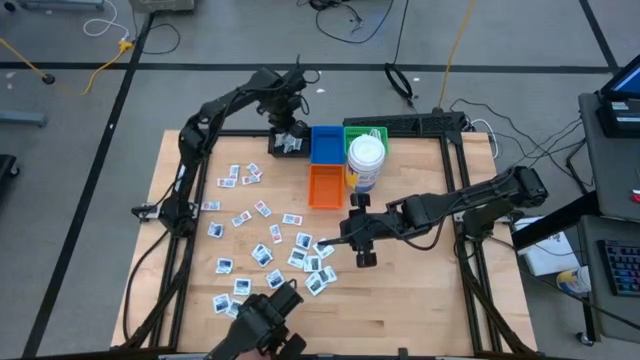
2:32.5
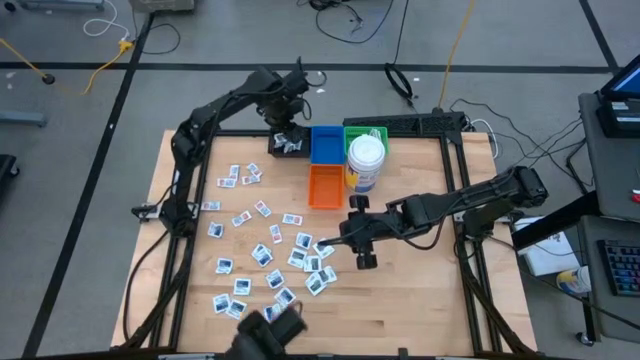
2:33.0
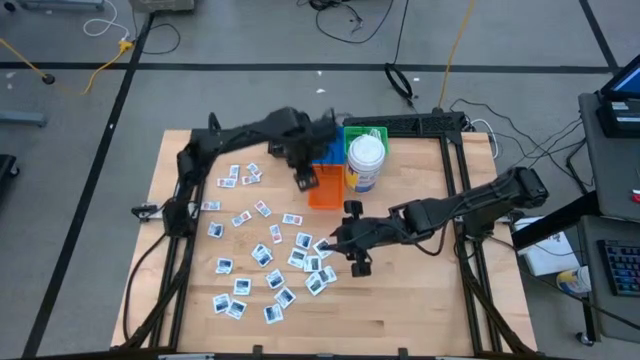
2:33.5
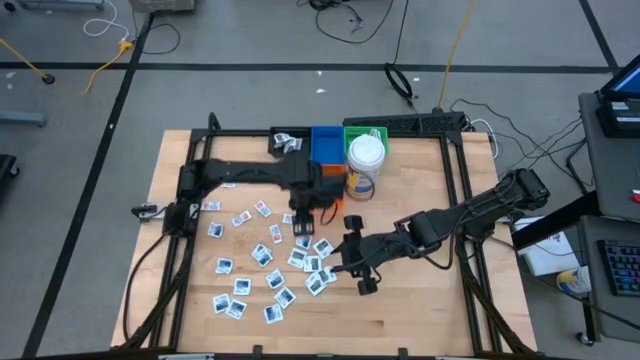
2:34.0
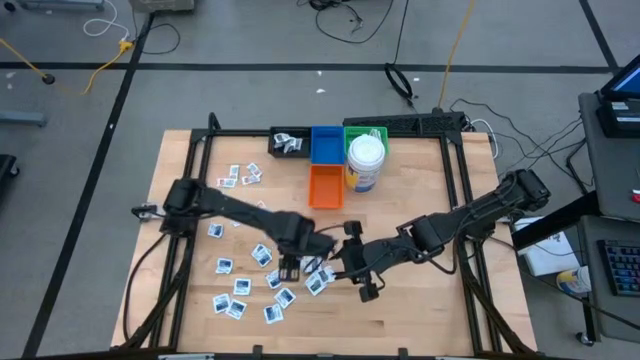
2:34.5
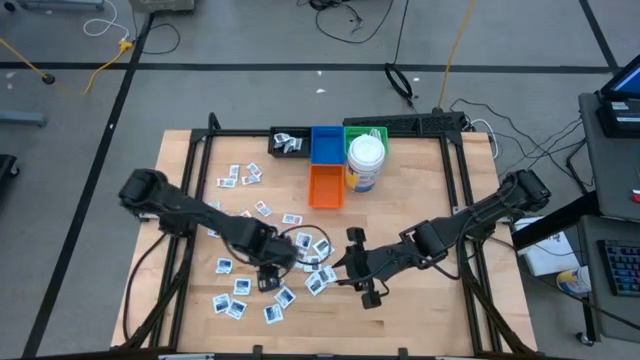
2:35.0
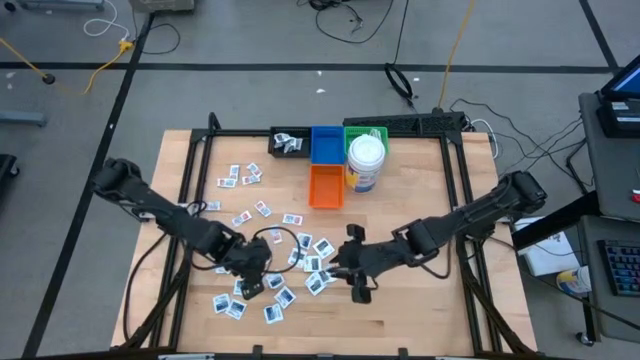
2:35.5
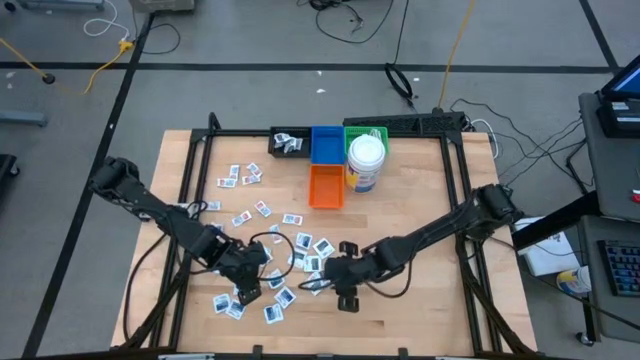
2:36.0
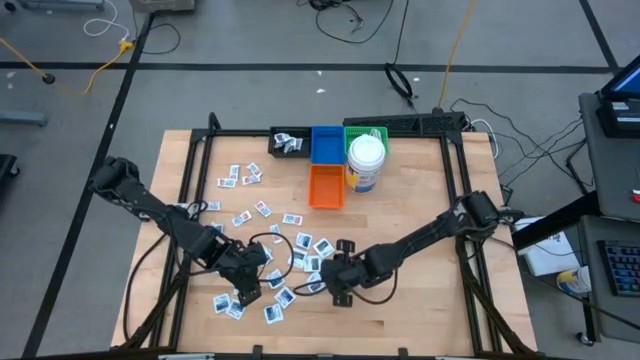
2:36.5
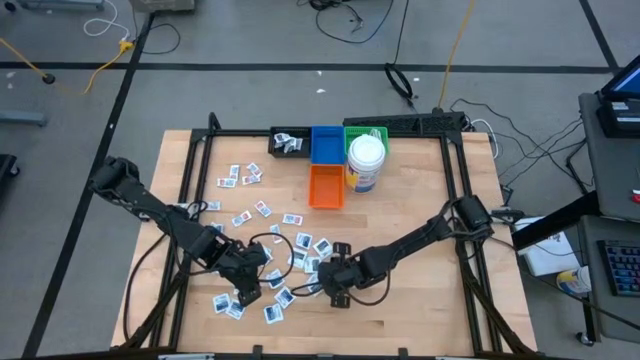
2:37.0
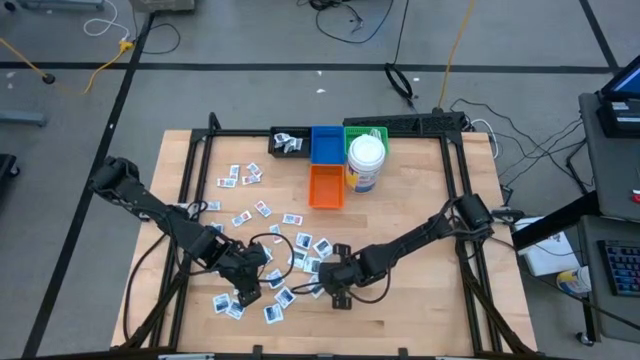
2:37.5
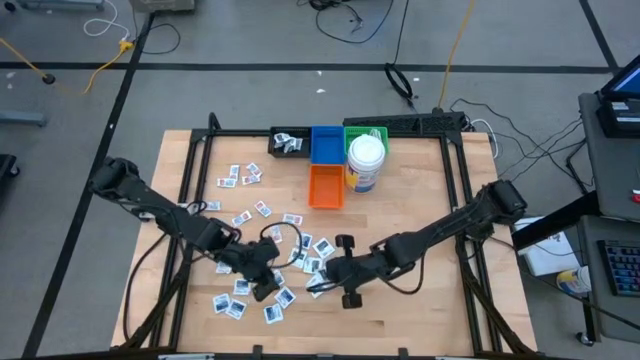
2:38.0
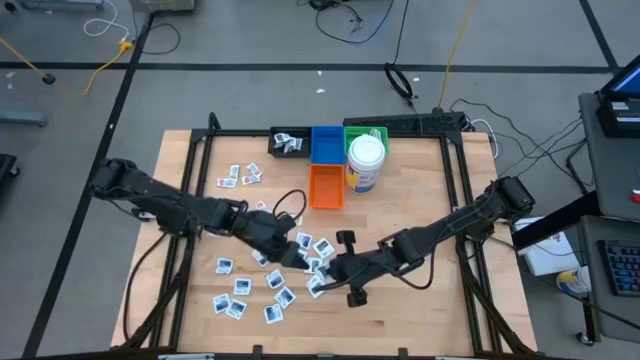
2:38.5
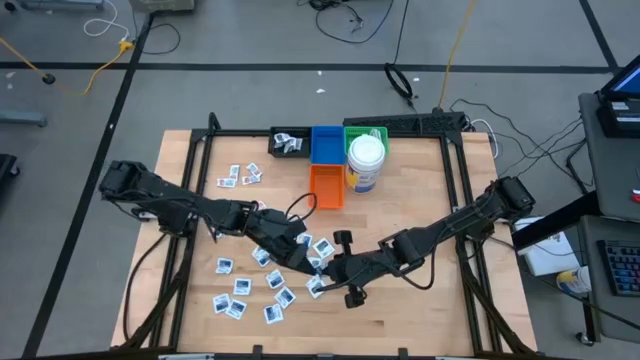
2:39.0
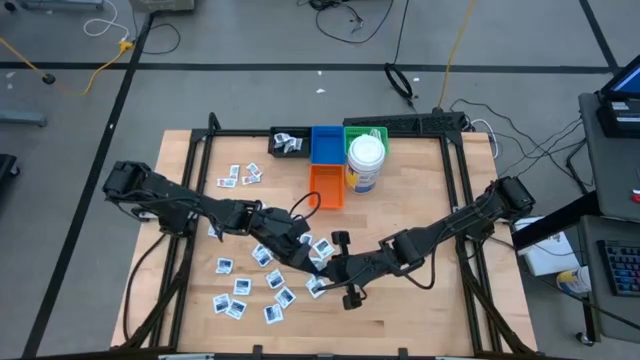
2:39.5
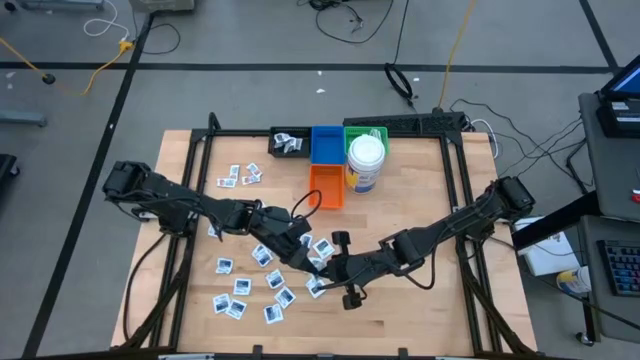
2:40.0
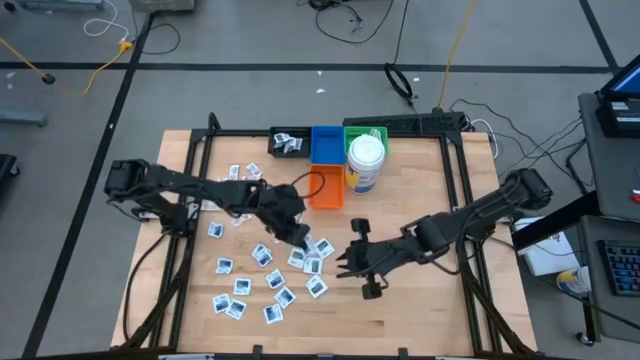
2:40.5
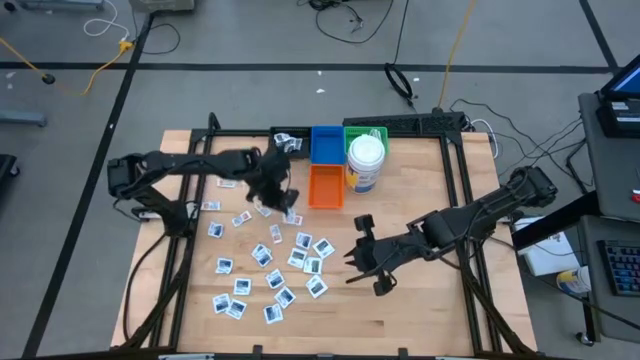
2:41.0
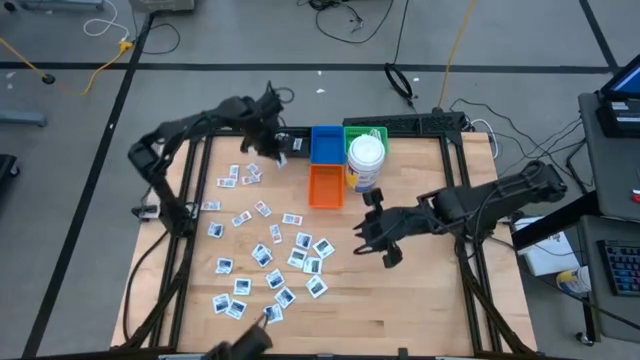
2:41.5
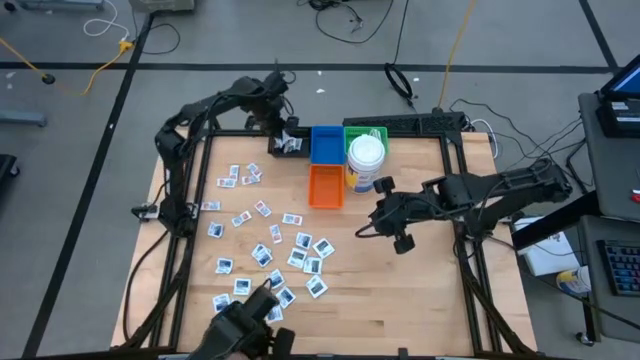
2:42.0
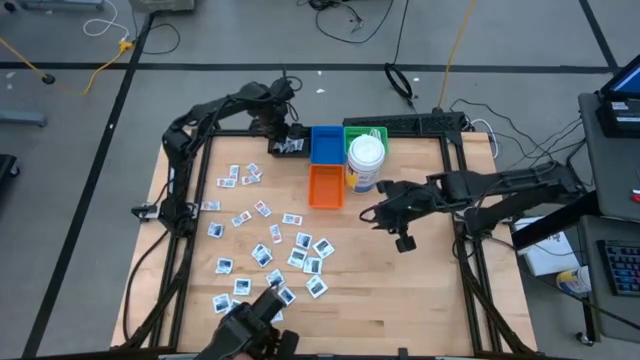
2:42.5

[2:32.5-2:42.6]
Task: Pick & Place First Aid Supplies
Put the gray towelette pack into the black bin

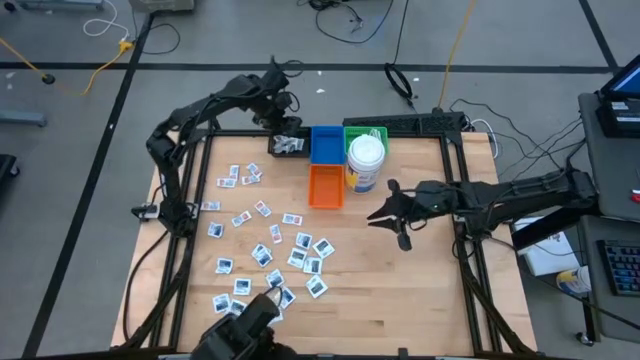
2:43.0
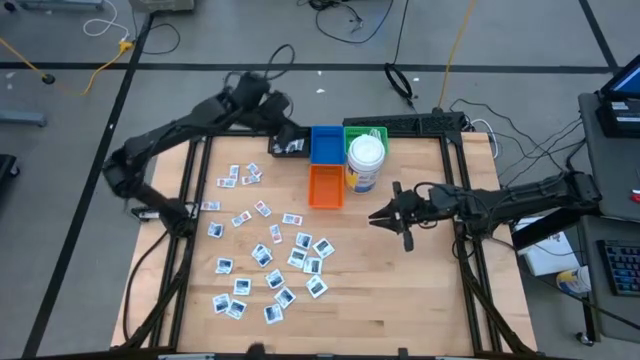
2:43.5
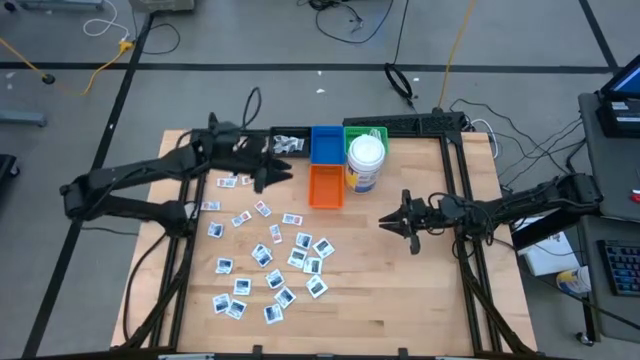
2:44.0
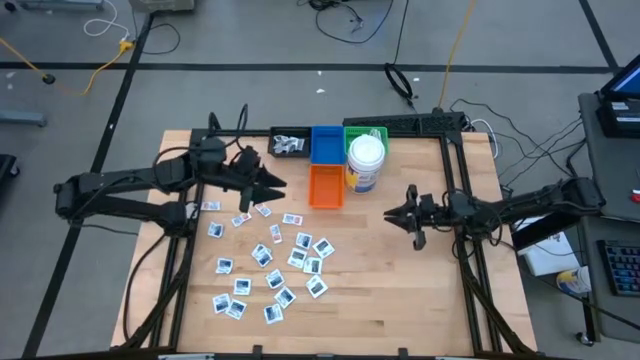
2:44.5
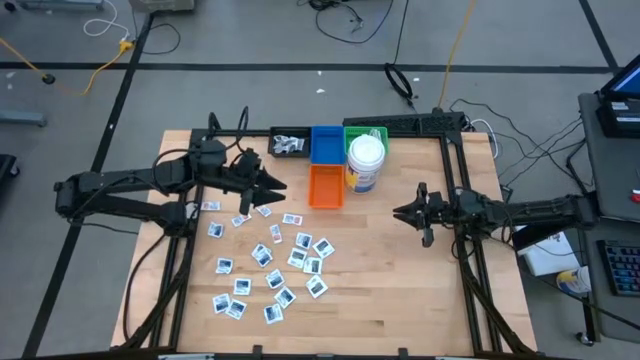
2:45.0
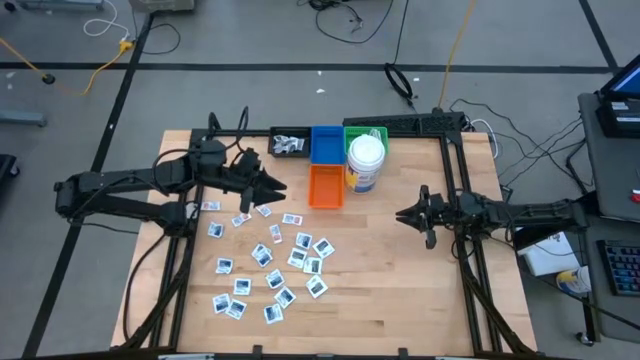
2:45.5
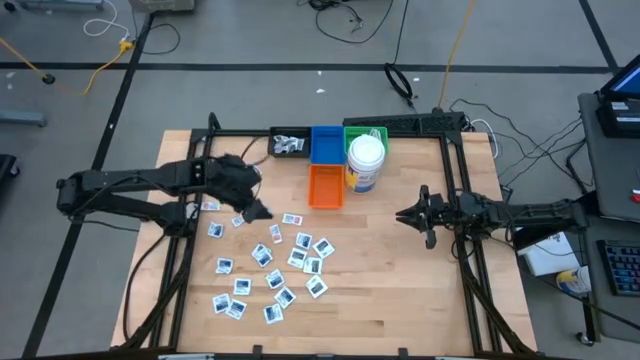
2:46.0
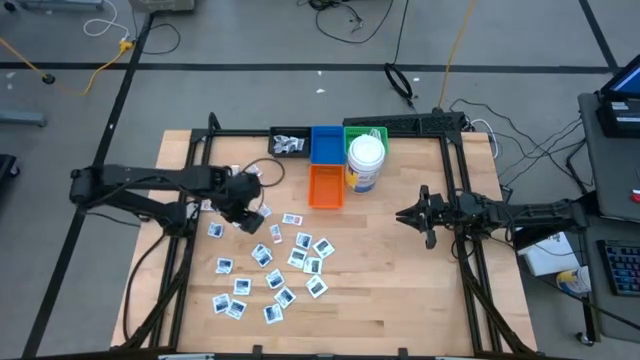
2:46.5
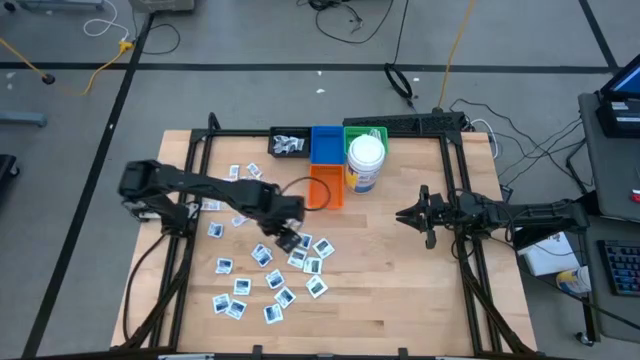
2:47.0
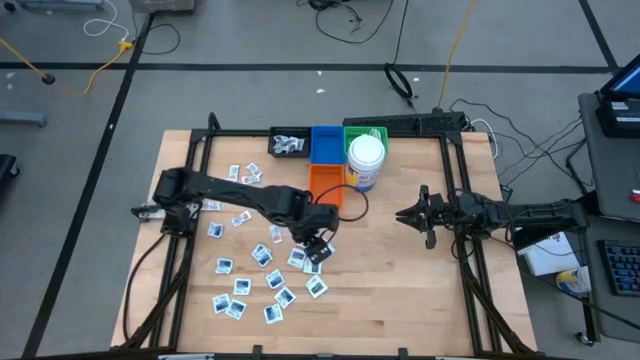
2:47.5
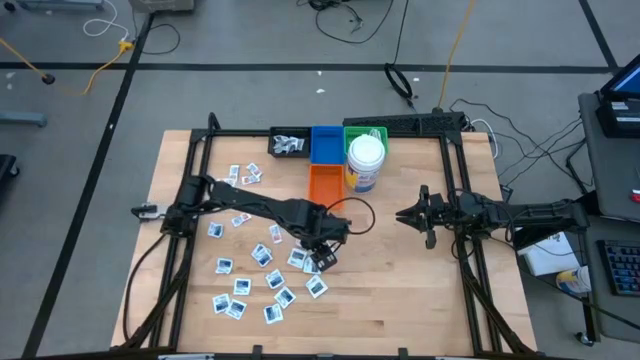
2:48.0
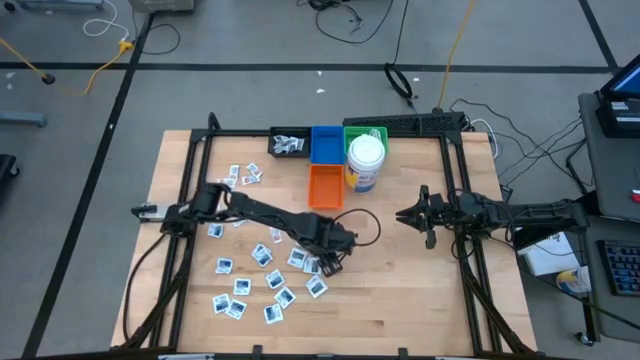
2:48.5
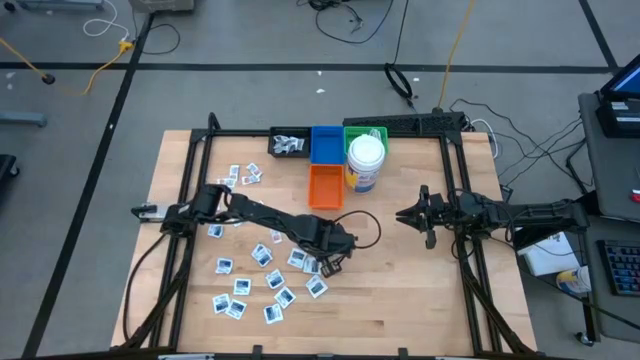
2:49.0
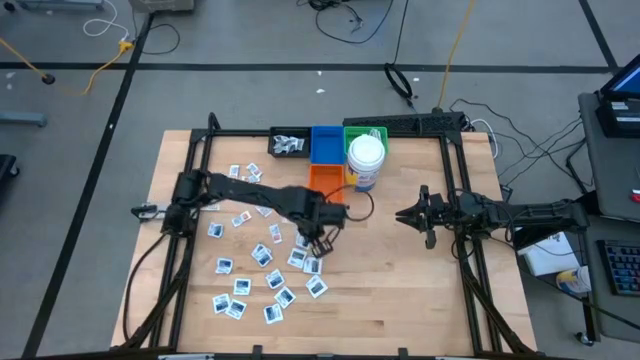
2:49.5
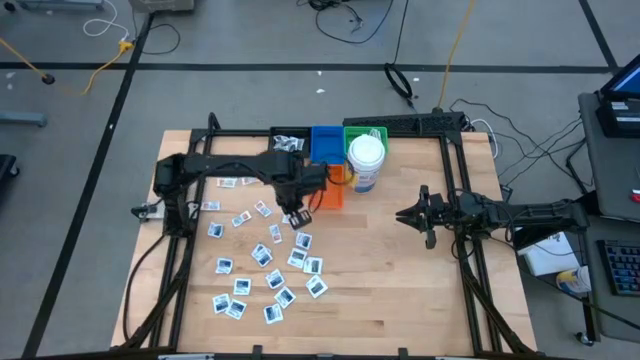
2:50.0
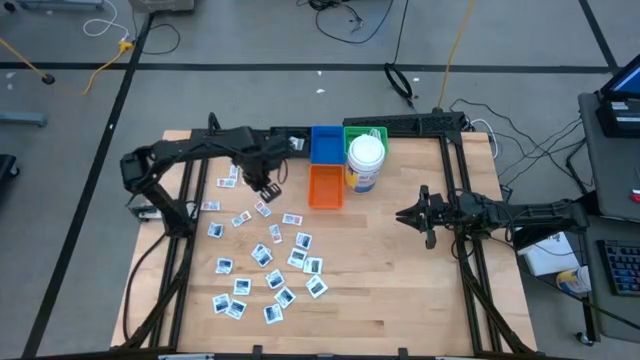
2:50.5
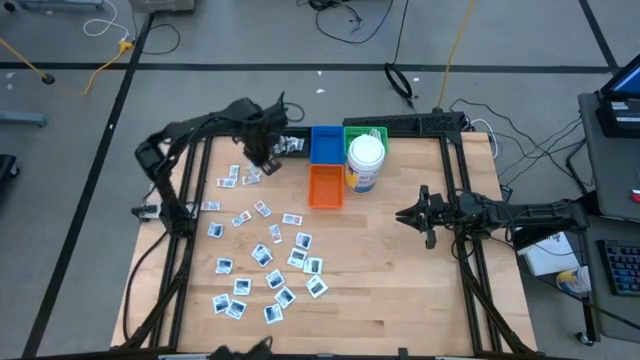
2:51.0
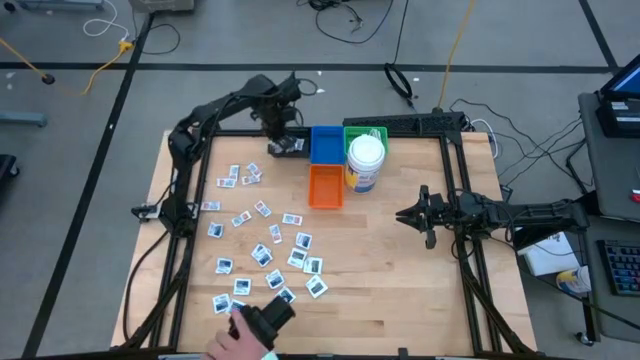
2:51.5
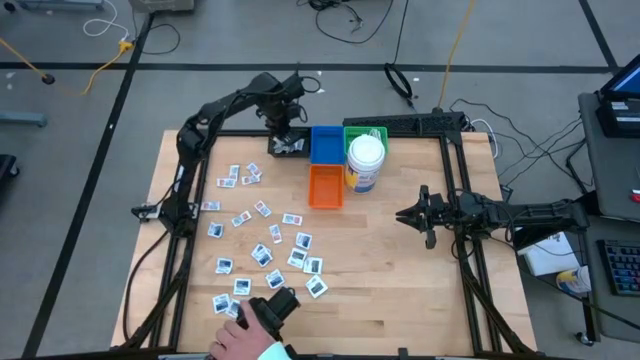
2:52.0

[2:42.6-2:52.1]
Put the gray towelette pack into the black bin

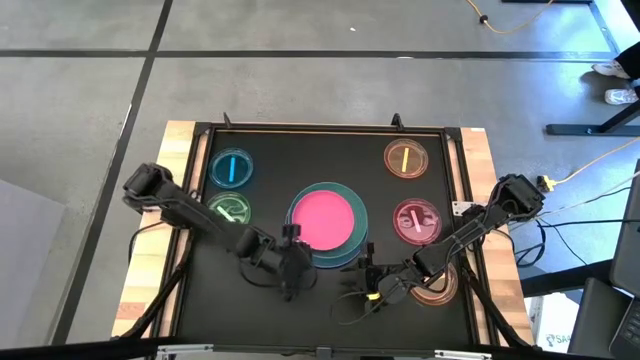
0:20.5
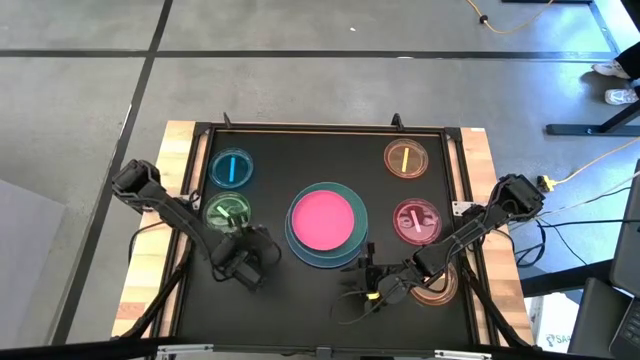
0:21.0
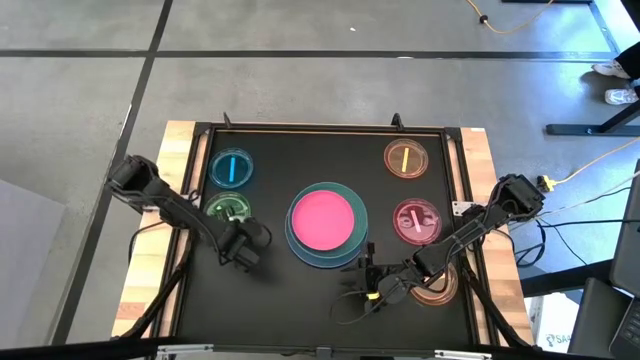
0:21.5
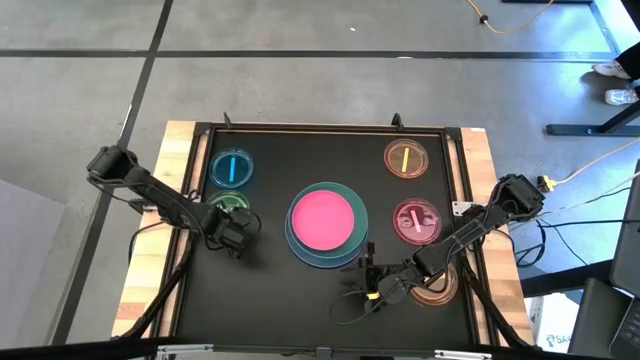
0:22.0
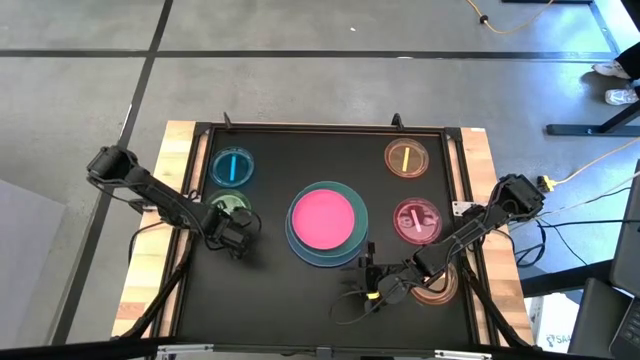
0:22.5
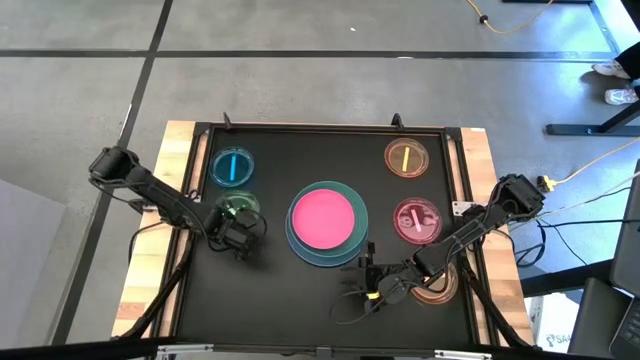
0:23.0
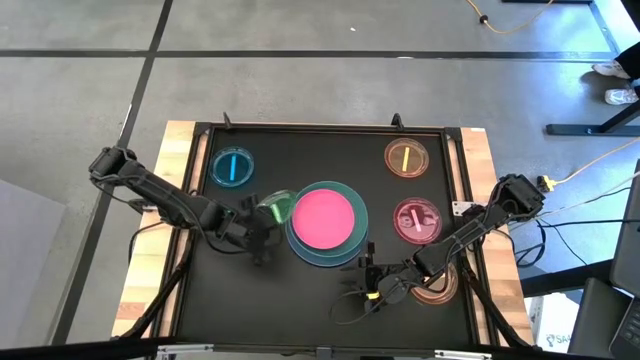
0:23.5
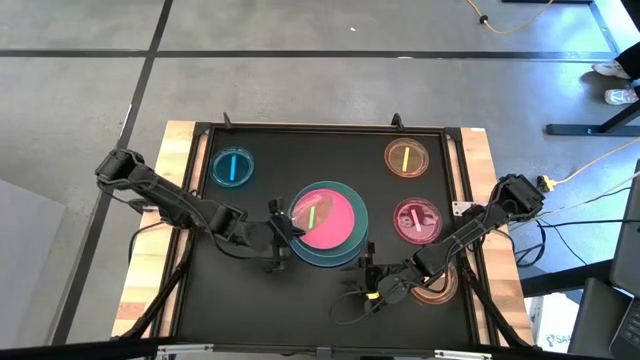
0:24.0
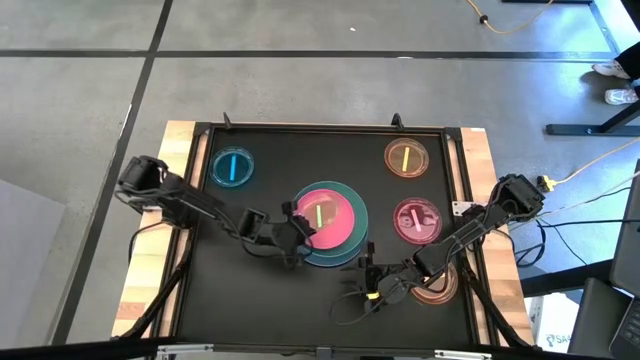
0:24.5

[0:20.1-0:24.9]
Task: Stack plastic plates
Stack the light green plate on the pink plate
